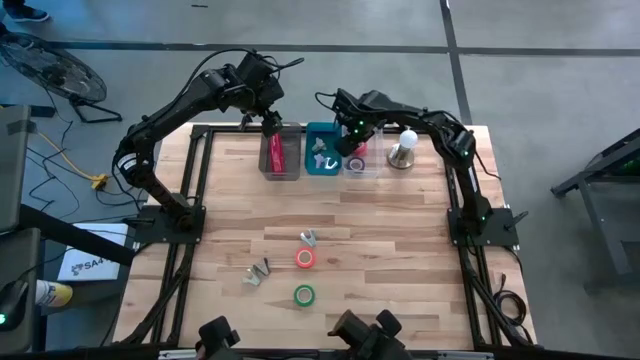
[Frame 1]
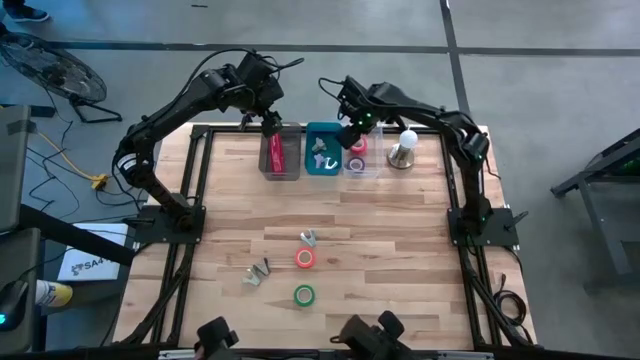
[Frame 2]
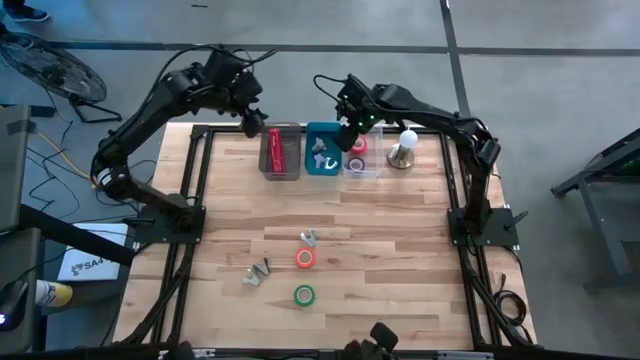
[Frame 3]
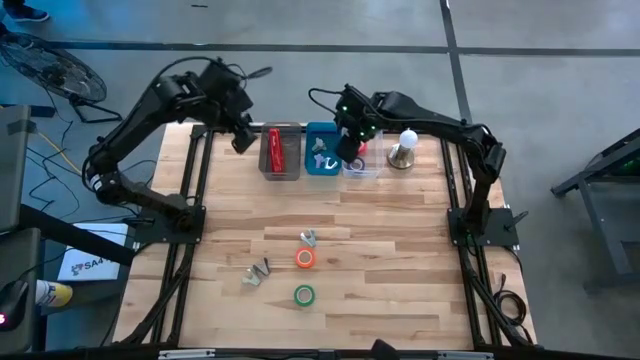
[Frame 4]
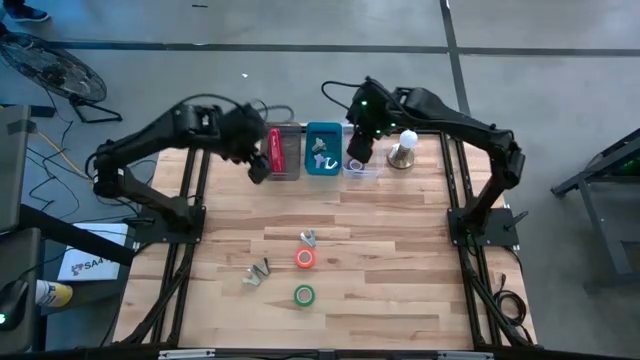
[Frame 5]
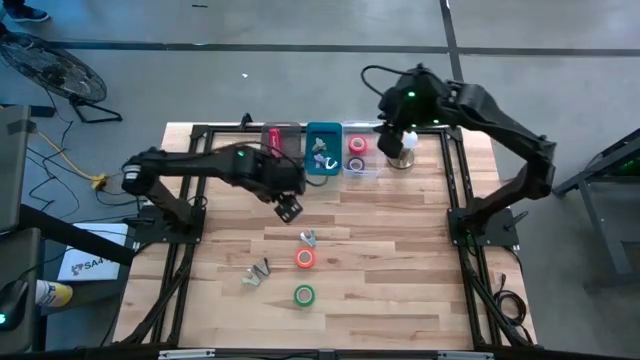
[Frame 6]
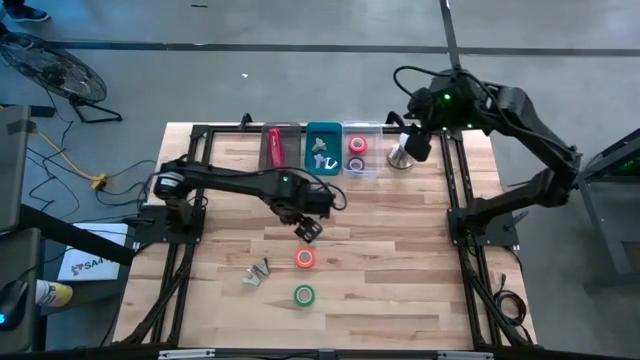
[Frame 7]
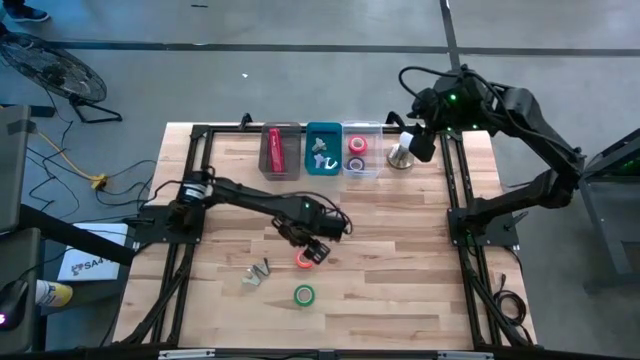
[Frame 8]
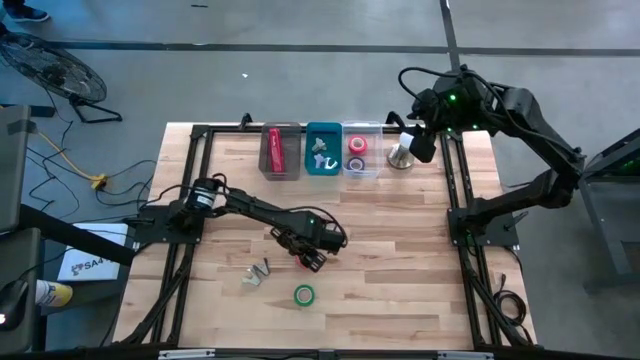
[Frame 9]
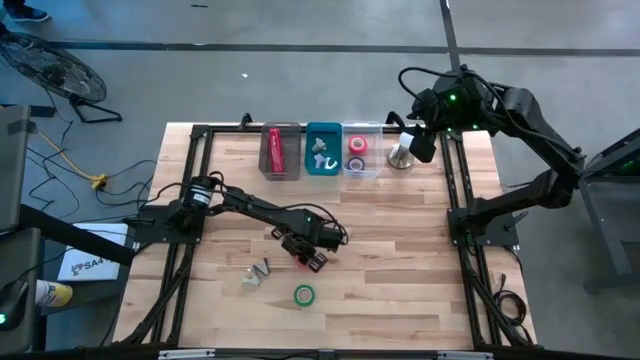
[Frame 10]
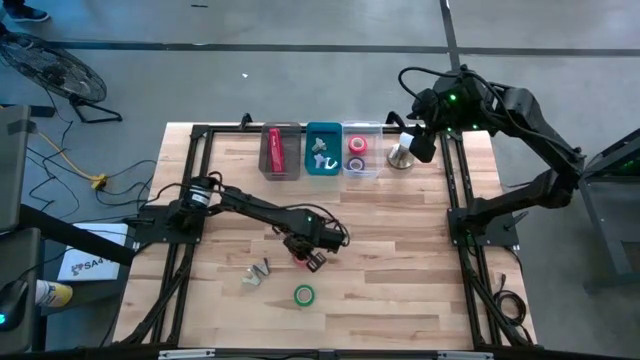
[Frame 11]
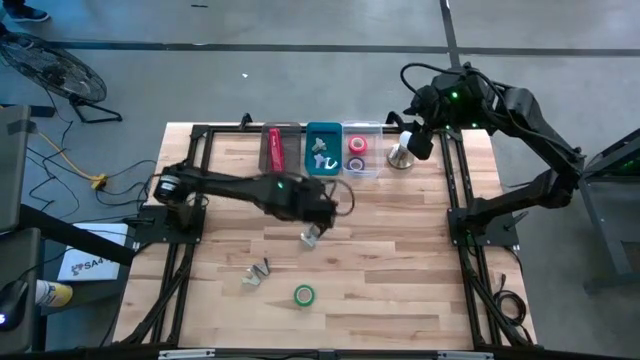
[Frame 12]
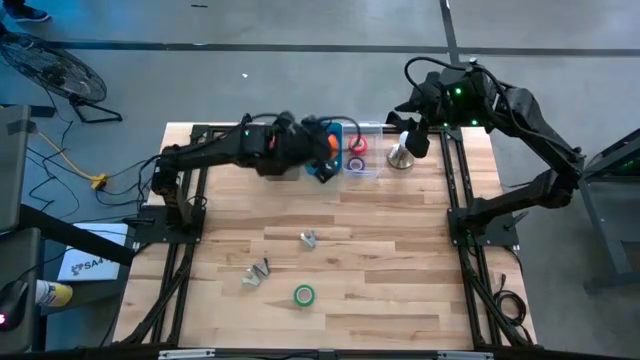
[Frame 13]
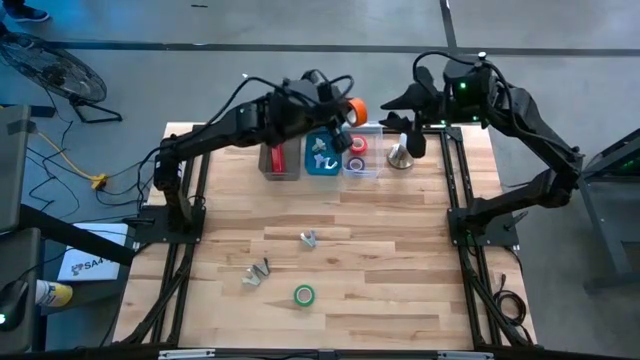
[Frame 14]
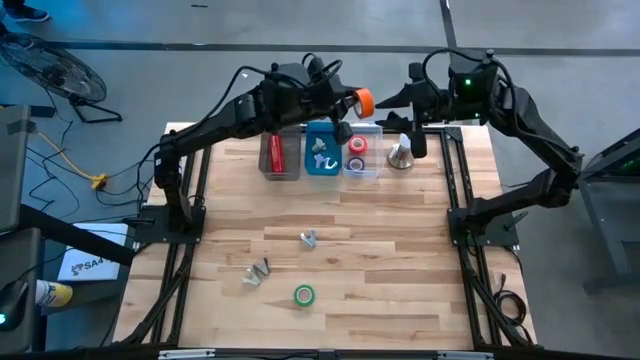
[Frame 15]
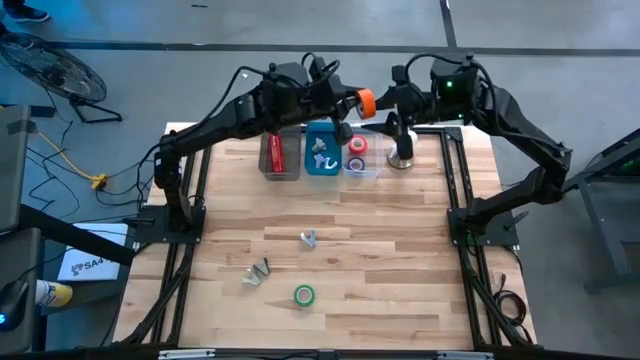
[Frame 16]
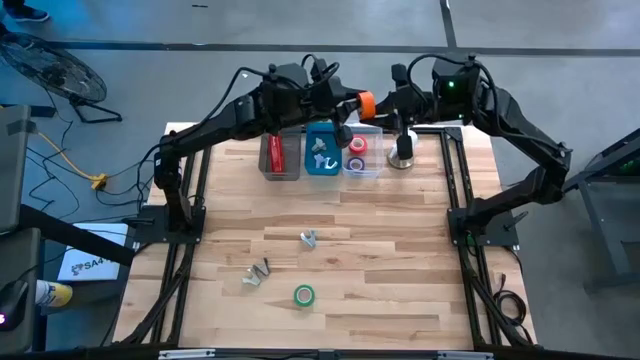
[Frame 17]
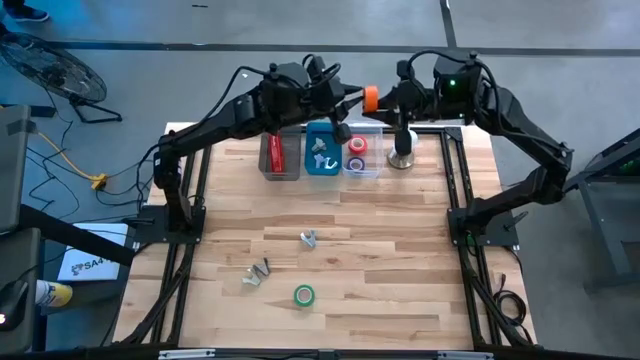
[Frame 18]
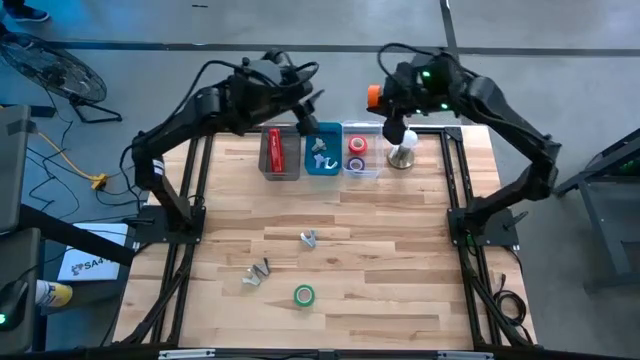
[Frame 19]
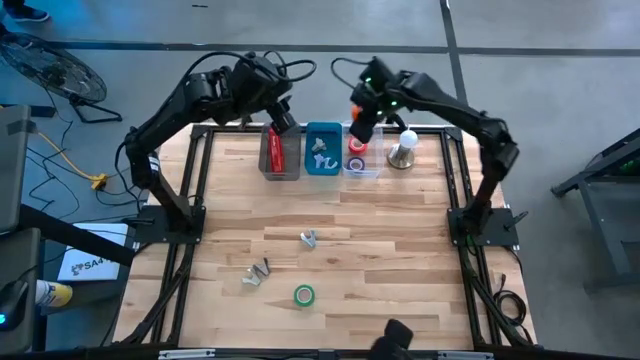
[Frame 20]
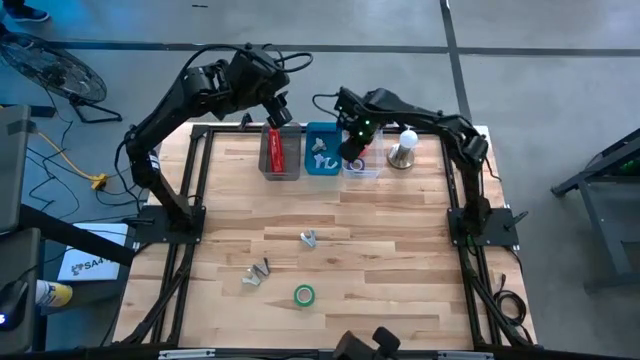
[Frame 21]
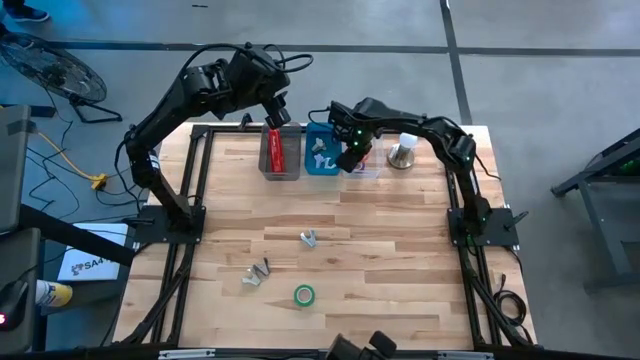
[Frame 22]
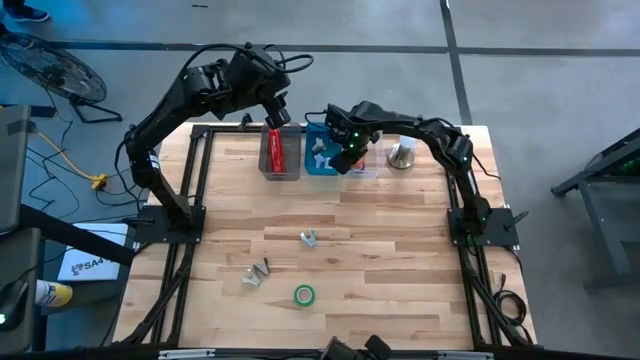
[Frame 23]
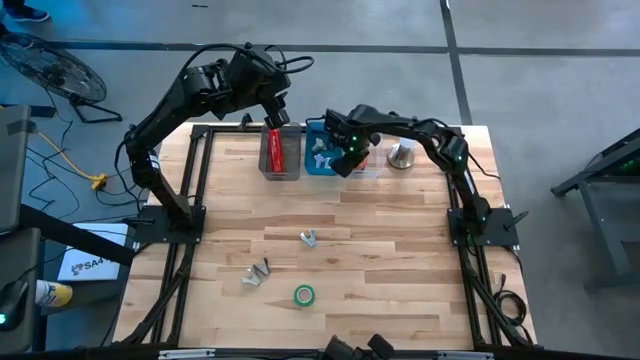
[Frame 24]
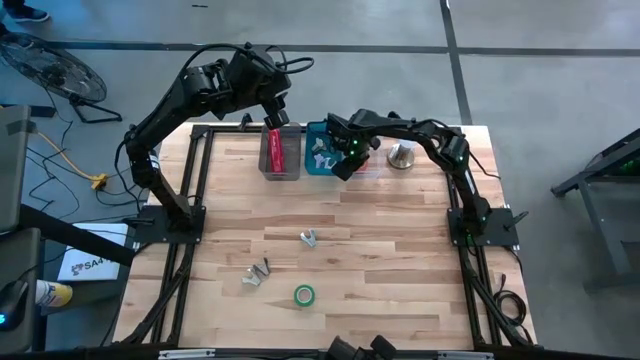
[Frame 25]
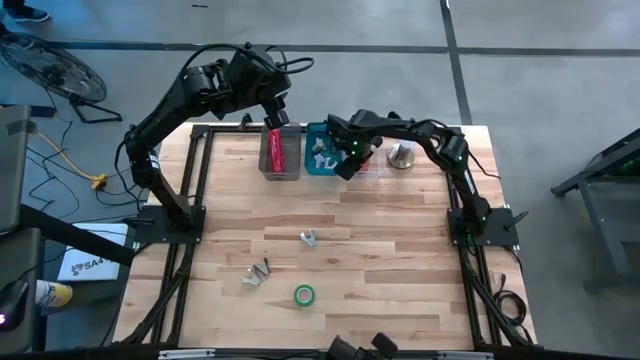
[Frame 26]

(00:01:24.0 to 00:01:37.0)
Task: Pick and place Stapler, Stapler remover, tape
Put the orange tape into the transparent bin

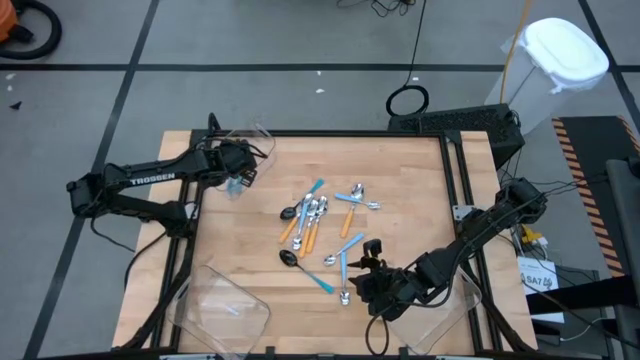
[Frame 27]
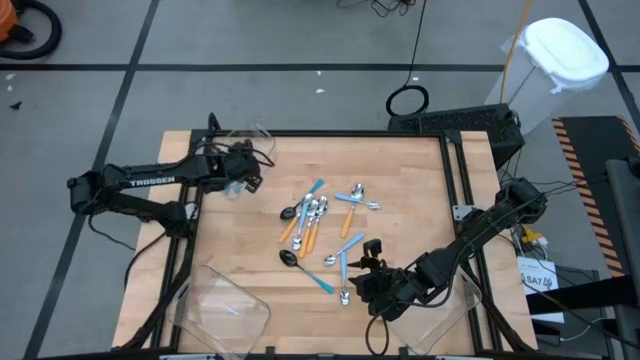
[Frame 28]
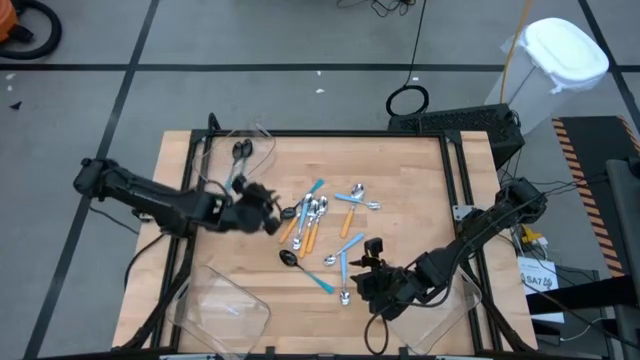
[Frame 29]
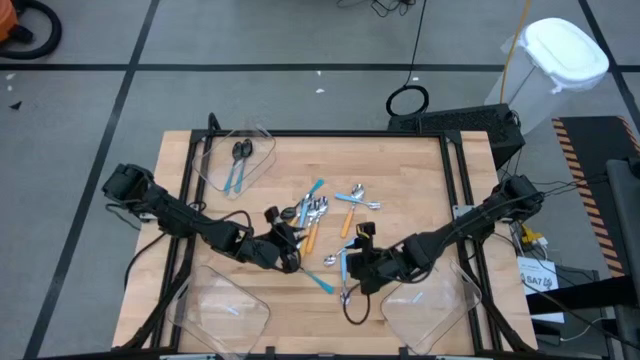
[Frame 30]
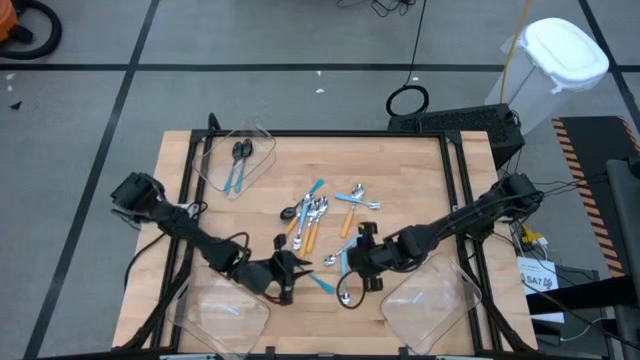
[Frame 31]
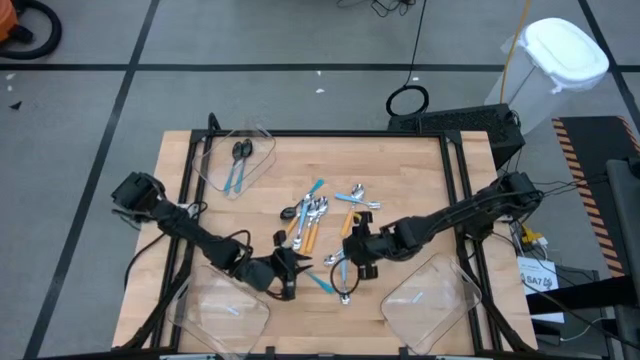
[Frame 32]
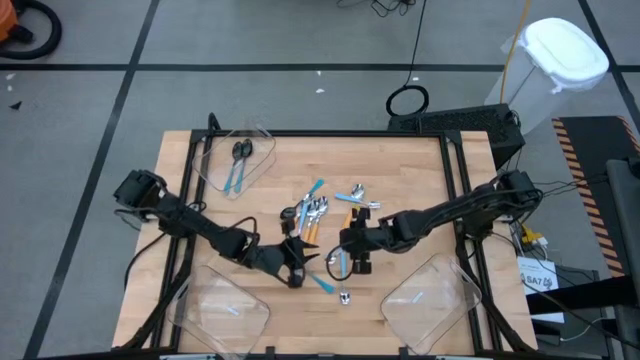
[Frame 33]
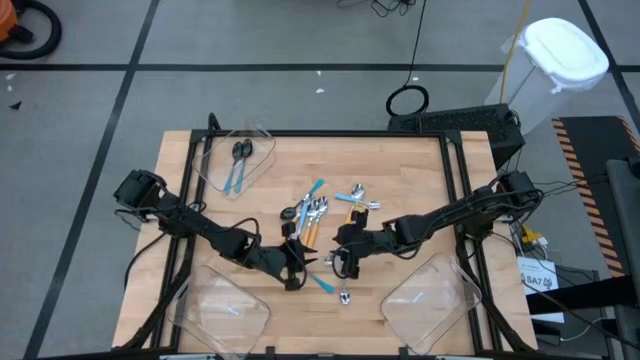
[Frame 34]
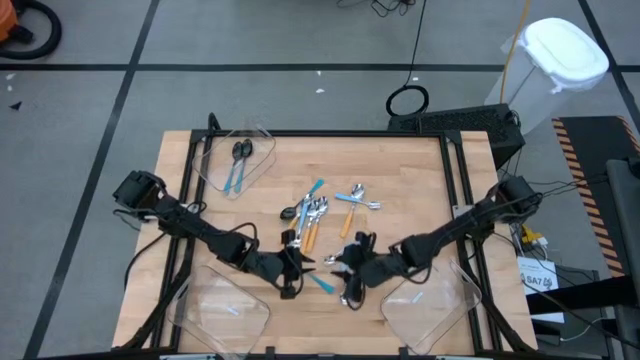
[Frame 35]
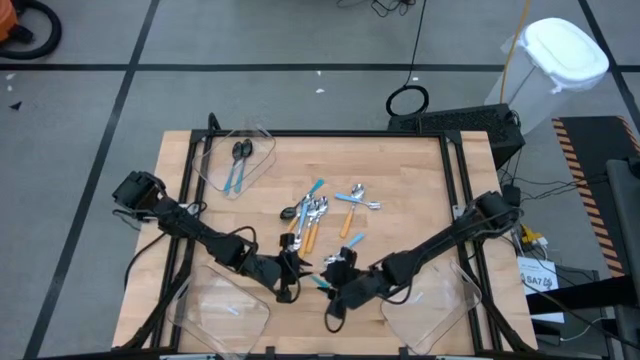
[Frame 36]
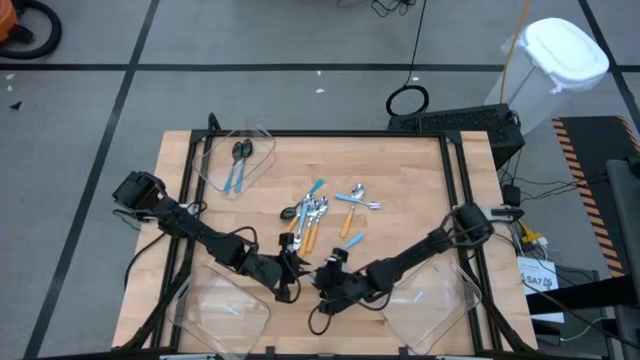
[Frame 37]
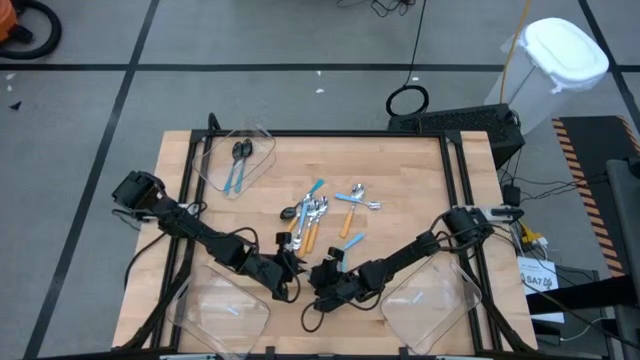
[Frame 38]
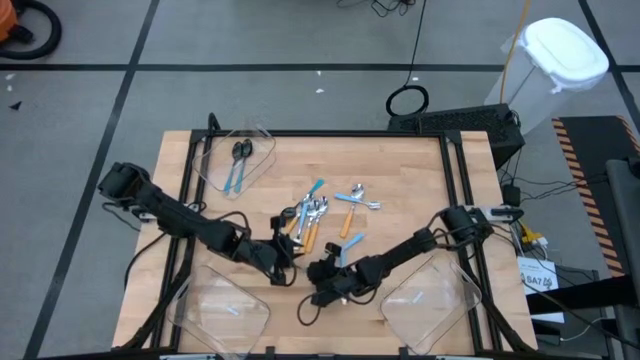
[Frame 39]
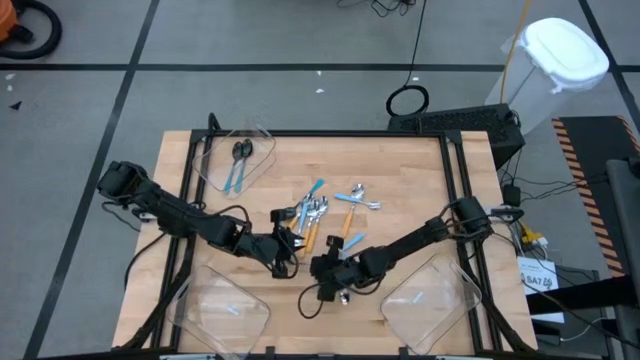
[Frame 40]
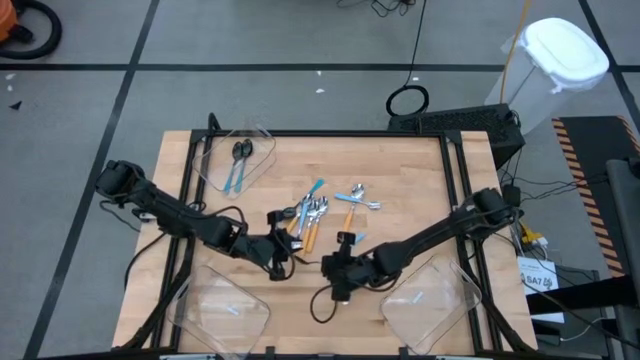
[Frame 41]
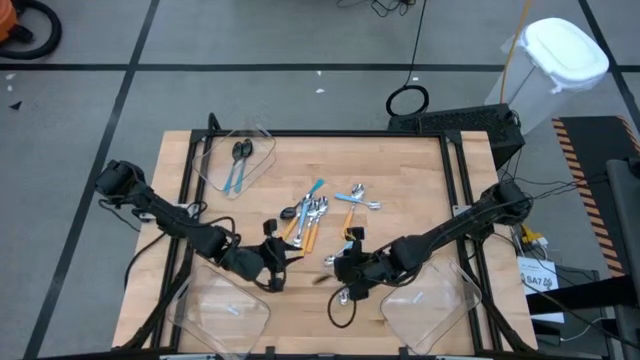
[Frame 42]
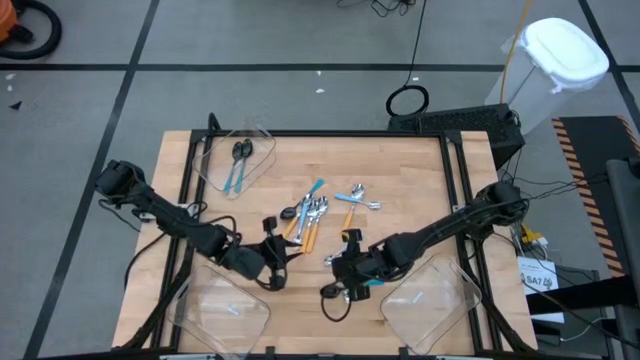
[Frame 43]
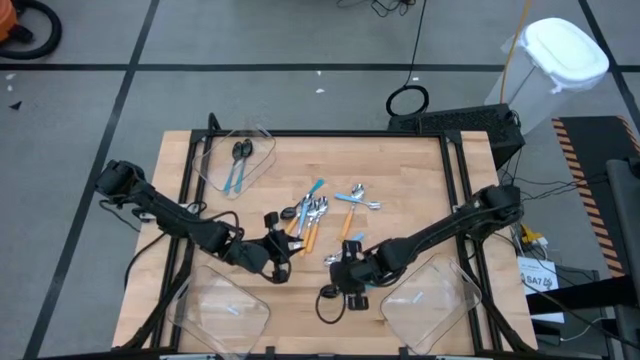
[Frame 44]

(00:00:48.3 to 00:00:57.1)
Task: Sort silverware by color (type)
Put the blue spoon into the top left transparent bin
